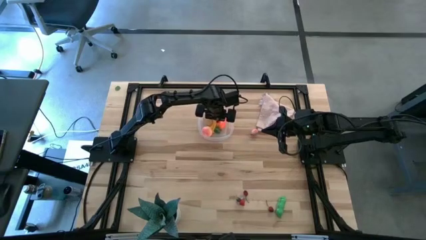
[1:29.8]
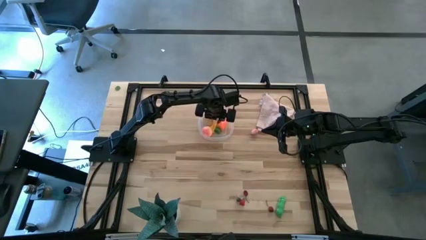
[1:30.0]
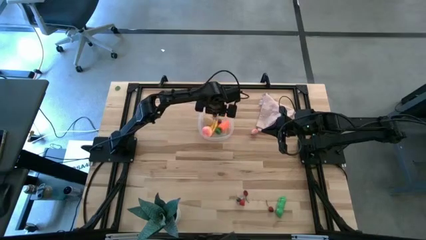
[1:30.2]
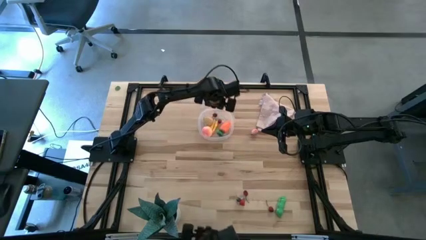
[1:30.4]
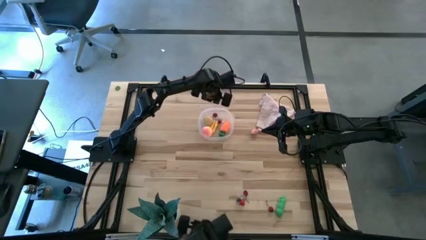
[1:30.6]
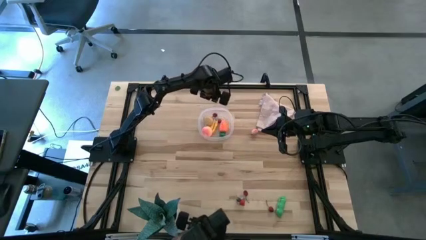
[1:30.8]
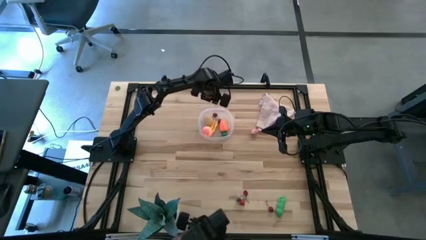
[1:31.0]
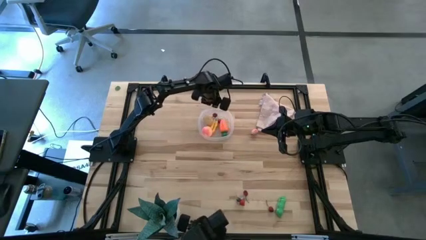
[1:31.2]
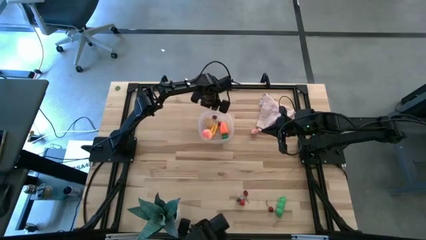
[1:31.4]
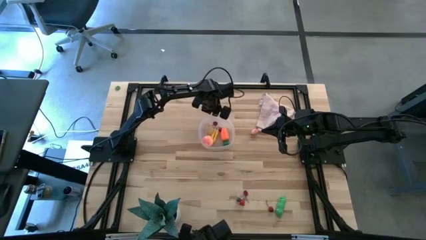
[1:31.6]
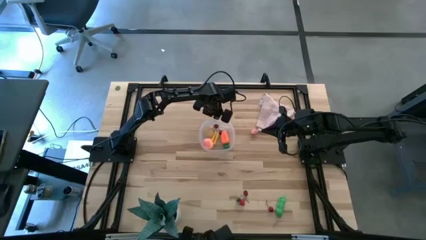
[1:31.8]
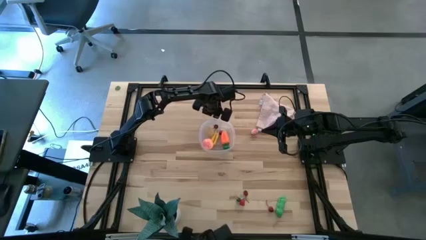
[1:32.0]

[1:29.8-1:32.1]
Task: Pick and placing Produce into tupperware
Adjust the transparent bin to the center of the table

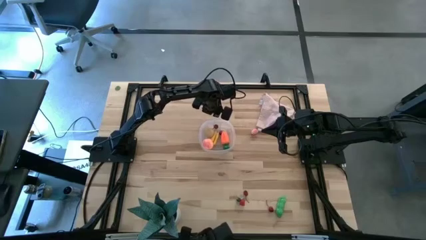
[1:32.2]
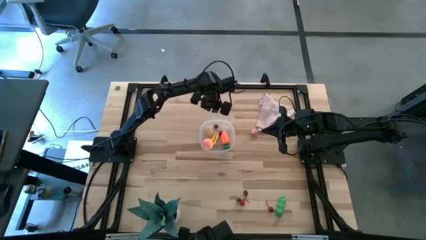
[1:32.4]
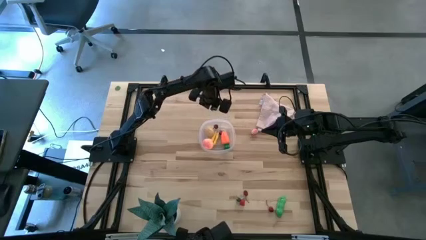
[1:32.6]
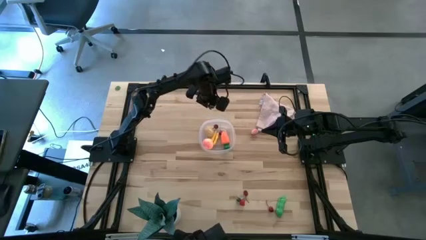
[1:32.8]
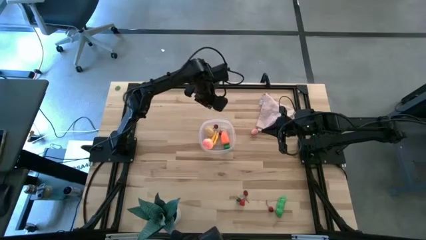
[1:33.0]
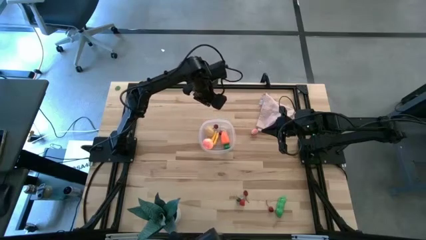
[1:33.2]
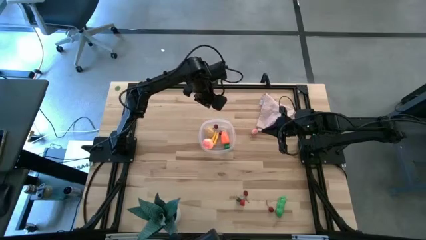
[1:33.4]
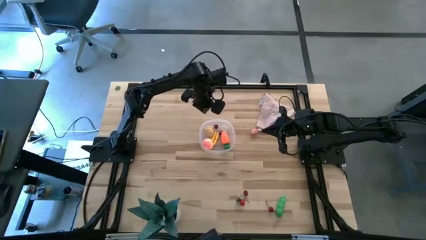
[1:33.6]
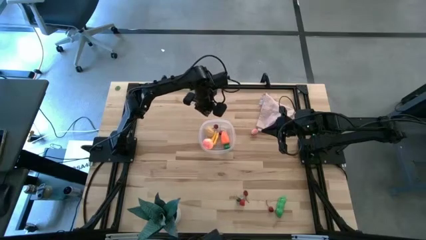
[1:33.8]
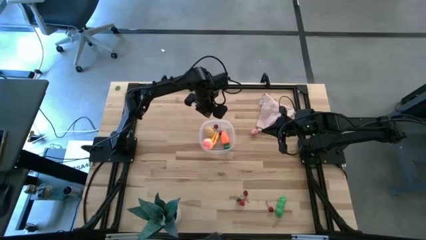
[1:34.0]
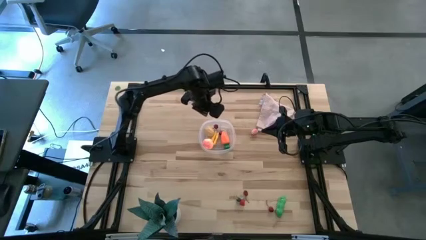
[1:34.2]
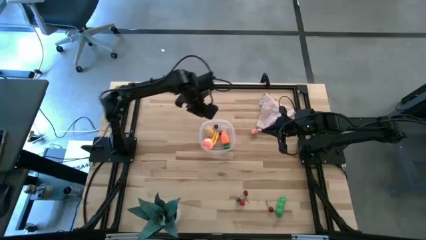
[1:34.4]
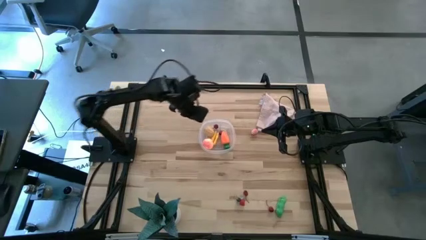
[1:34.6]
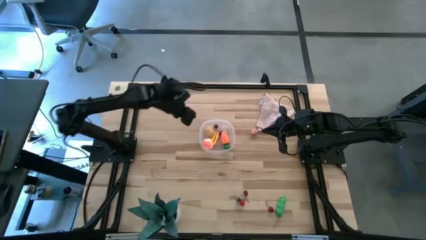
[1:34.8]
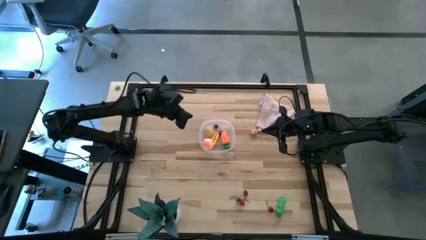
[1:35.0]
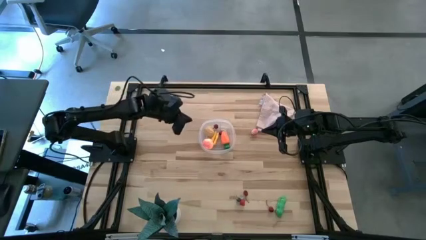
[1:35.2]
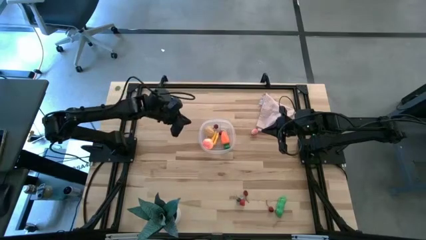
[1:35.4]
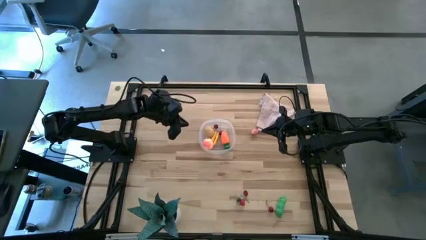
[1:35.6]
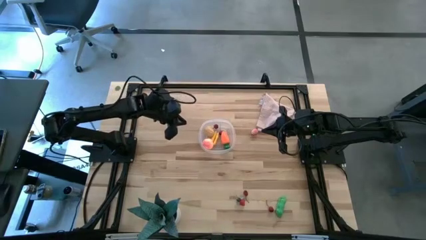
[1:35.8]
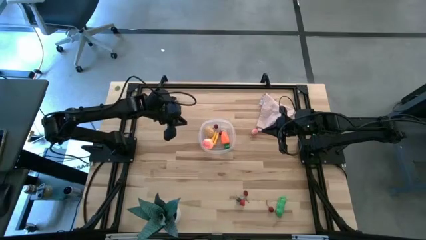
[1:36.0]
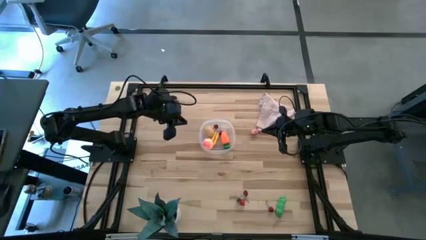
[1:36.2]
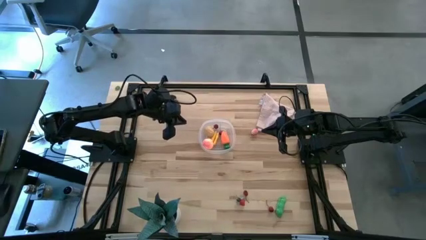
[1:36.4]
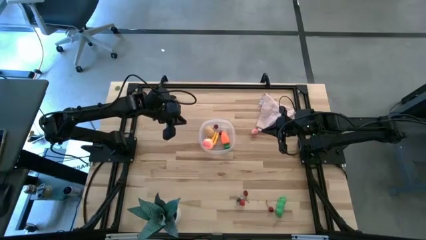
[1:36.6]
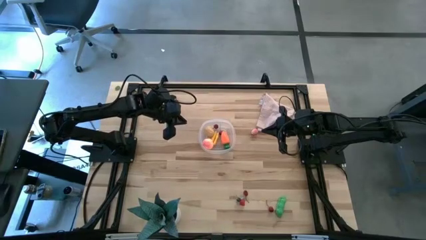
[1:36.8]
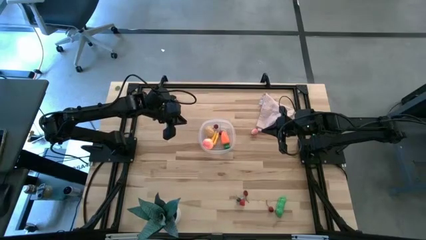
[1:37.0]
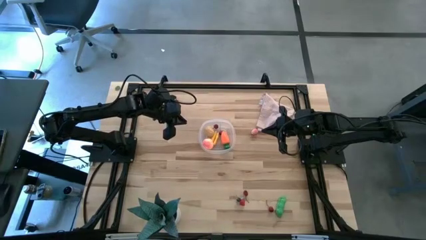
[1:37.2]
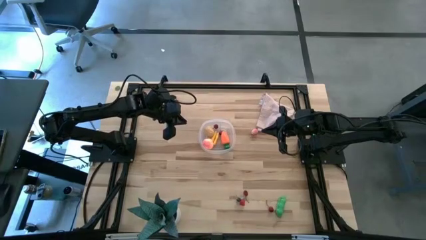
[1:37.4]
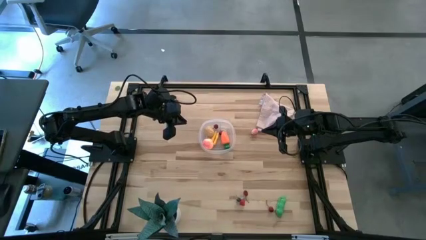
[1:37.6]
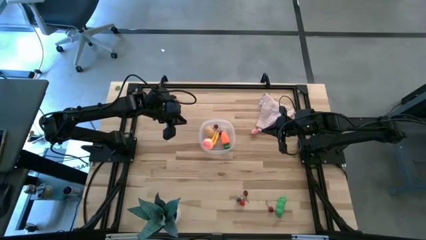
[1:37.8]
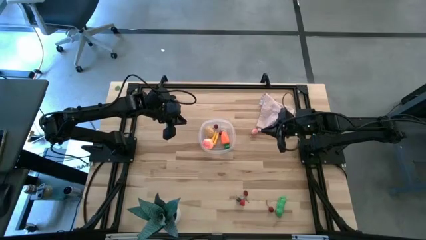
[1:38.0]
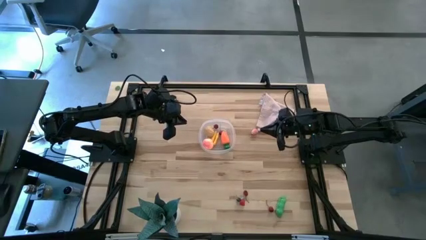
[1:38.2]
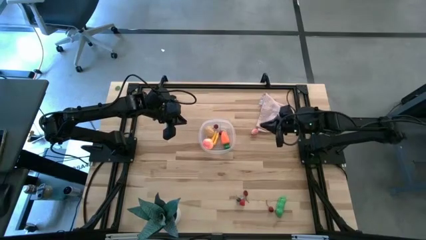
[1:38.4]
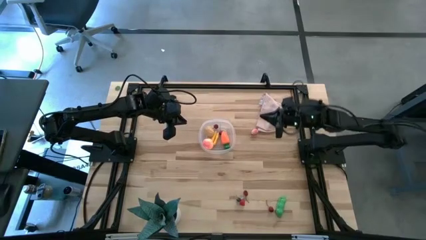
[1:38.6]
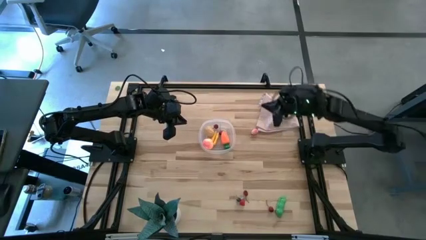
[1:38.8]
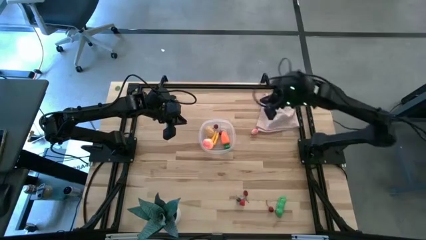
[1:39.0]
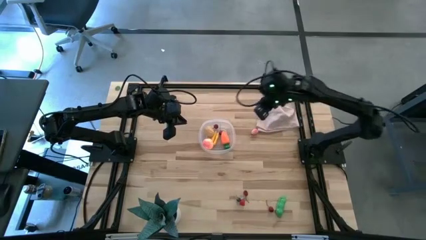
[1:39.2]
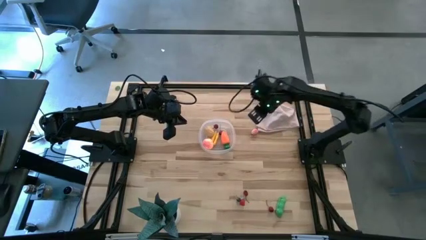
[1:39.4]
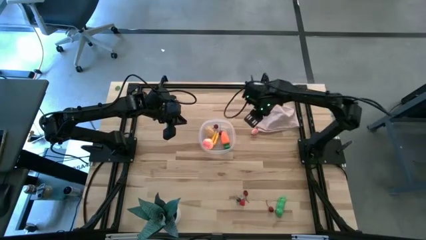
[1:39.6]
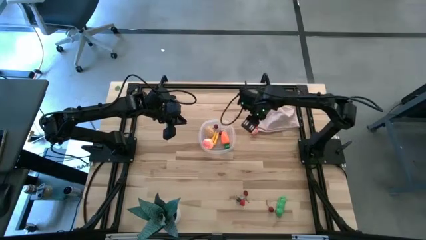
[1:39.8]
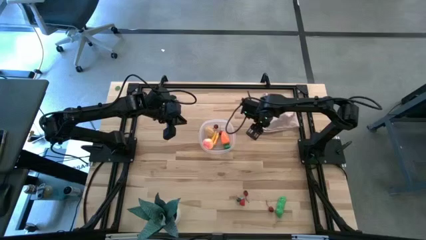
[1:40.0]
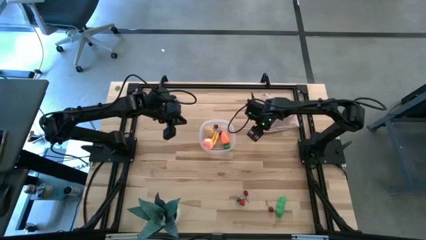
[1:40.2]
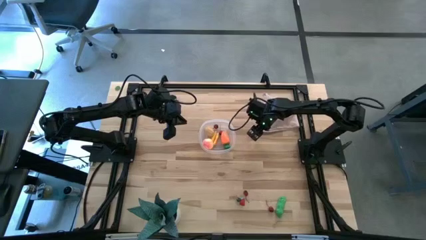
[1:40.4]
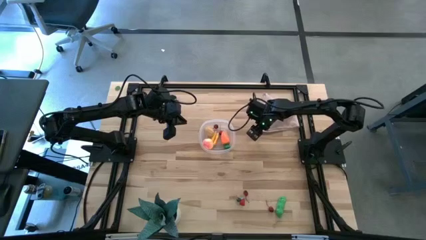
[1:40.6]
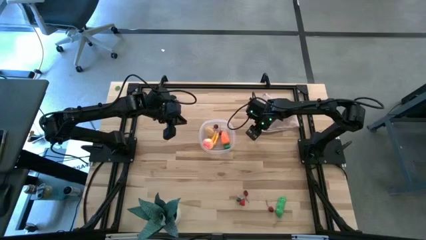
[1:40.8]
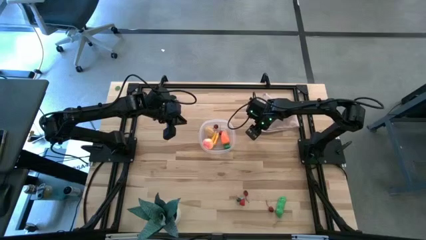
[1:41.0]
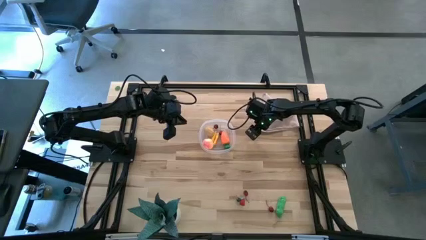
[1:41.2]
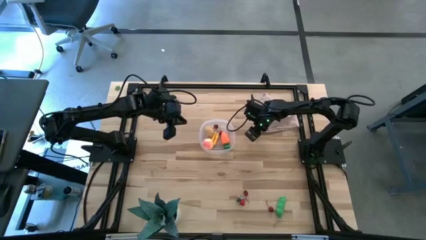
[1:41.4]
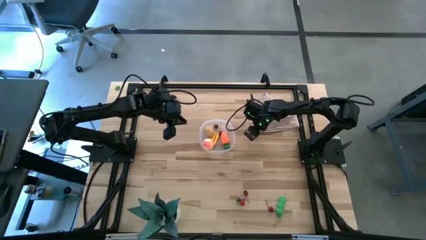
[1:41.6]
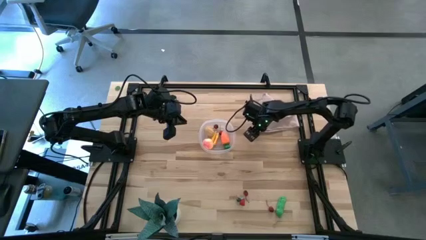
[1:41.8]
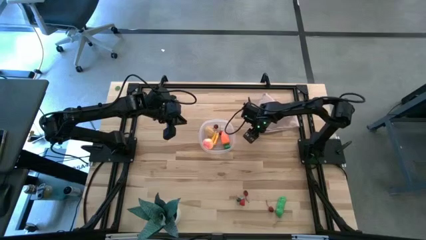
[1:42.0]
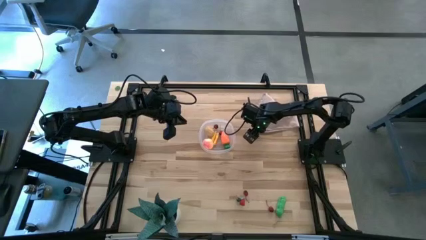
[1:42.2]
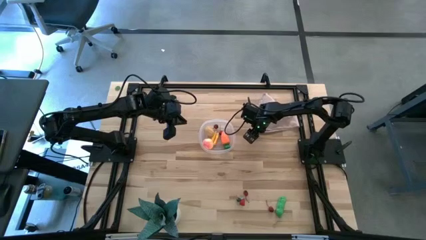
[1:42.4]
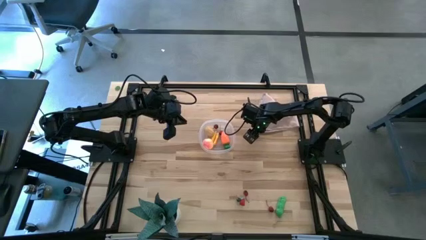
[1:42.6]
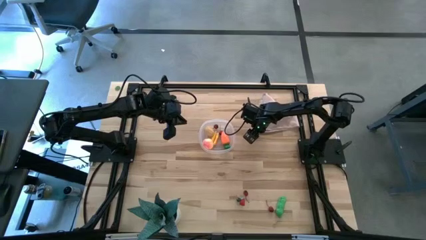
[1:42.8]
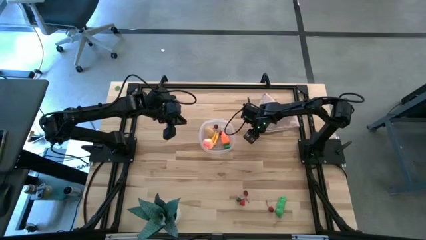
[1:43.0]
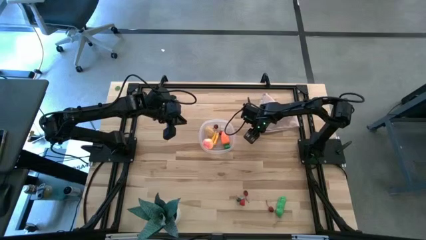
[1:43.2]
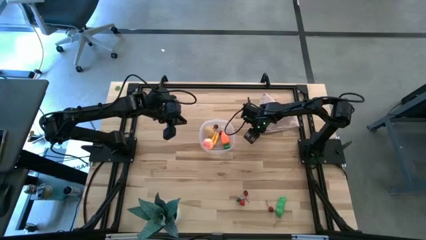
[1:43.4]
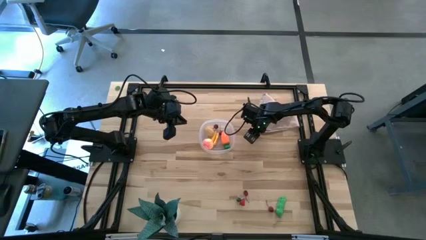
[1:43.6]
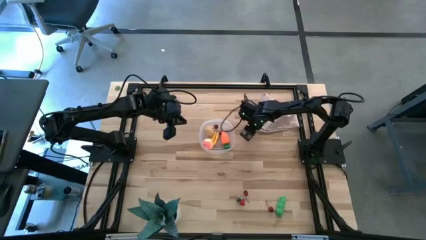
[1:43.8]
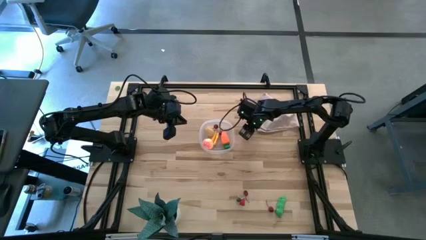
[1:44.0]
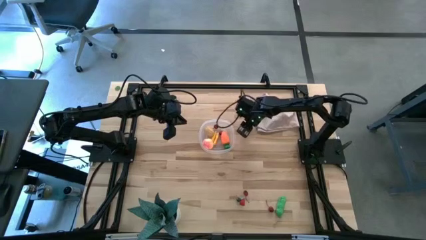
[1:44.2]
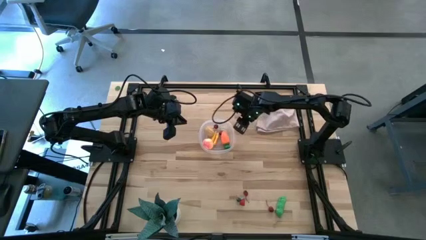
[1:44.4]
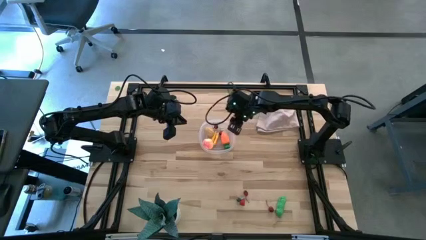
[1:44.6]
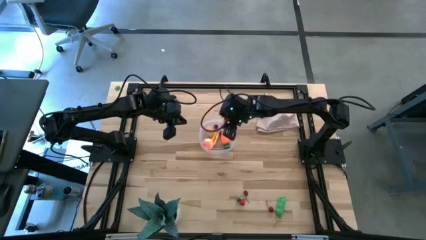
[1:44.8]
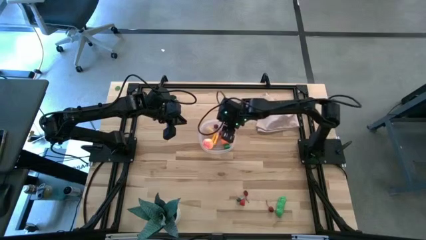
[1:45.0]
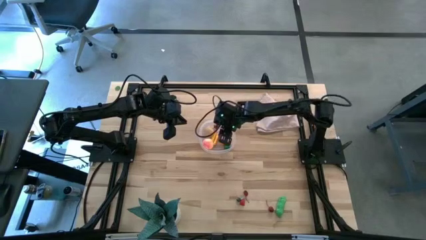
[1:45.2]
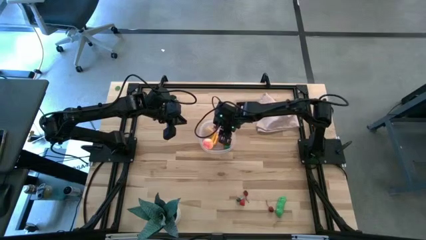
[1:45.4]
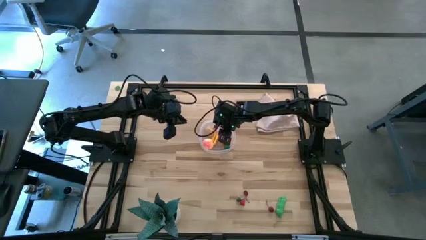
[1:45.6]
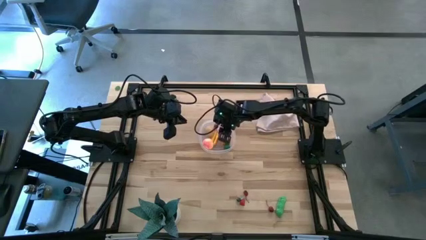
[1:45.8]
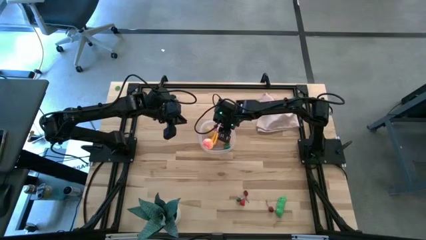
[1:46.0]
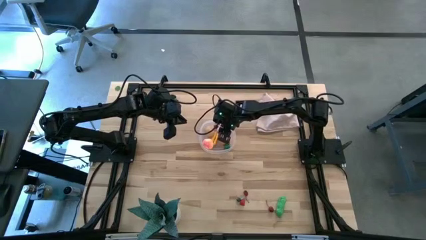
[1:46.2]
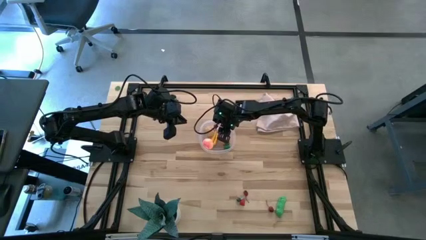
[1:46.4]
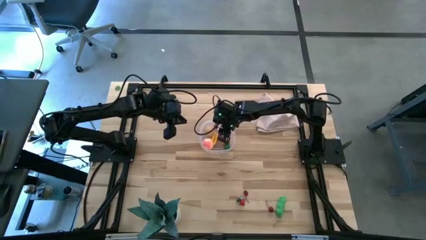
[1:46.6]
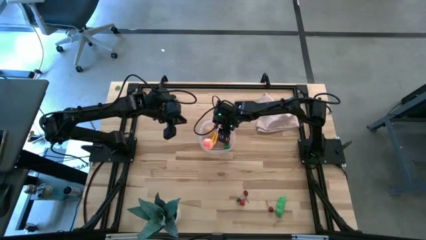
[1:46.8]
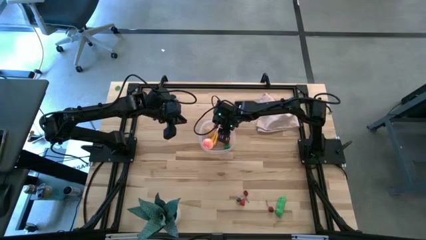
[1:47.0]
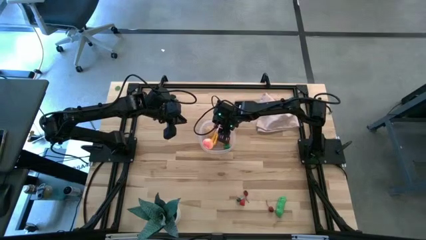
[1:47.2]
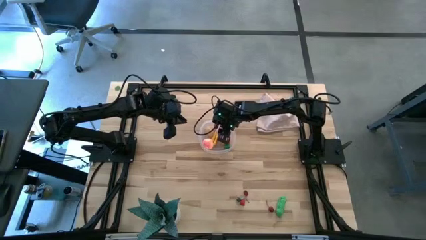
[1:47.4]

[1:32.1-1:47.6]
Put the pink peach into the transparent bin
